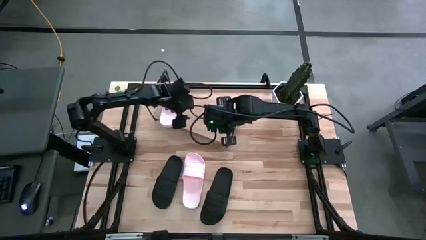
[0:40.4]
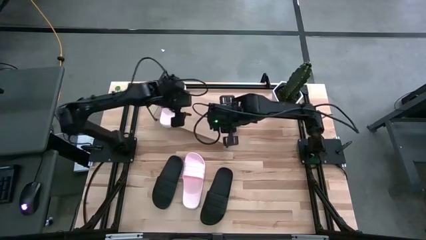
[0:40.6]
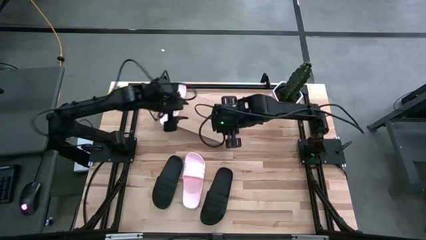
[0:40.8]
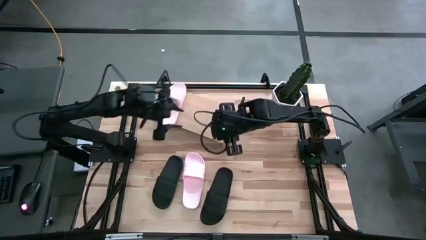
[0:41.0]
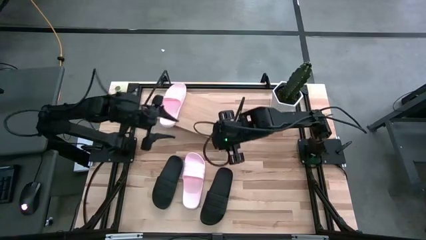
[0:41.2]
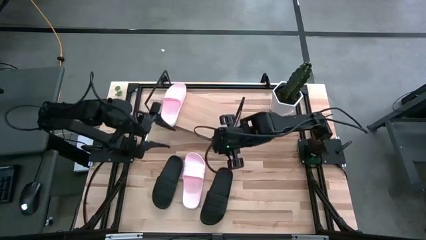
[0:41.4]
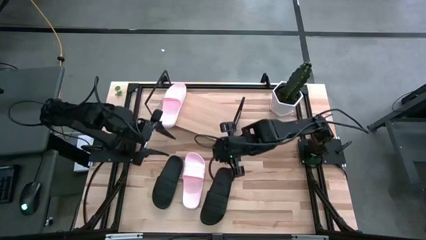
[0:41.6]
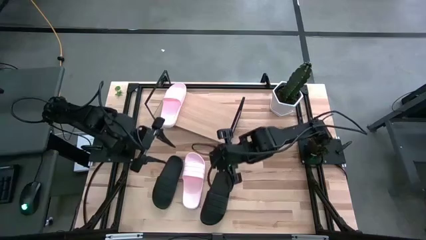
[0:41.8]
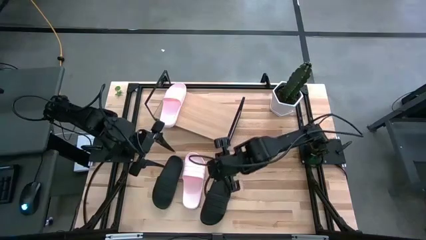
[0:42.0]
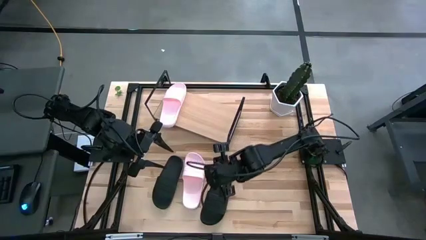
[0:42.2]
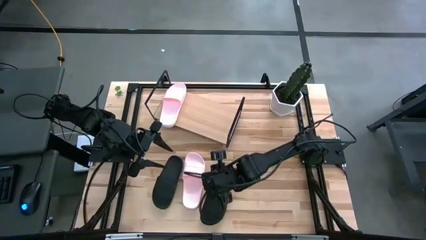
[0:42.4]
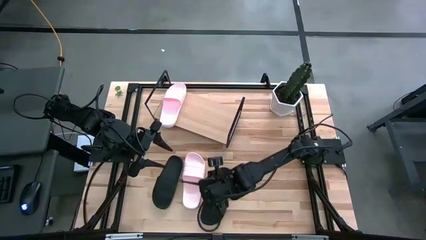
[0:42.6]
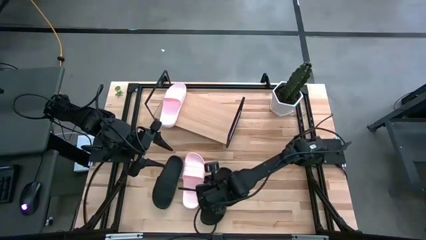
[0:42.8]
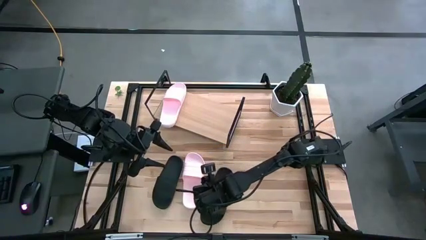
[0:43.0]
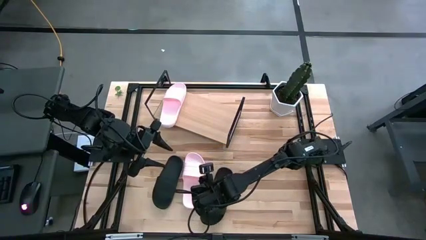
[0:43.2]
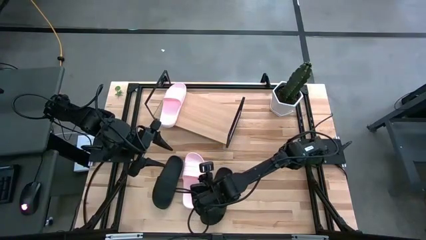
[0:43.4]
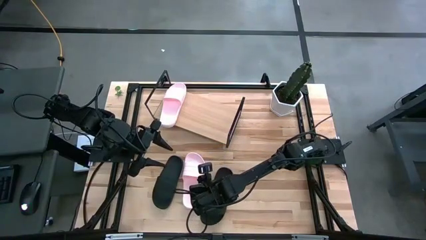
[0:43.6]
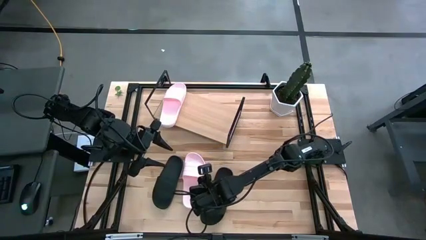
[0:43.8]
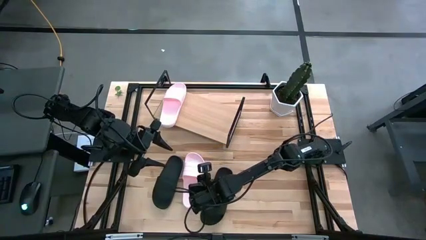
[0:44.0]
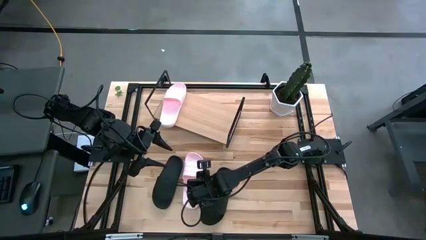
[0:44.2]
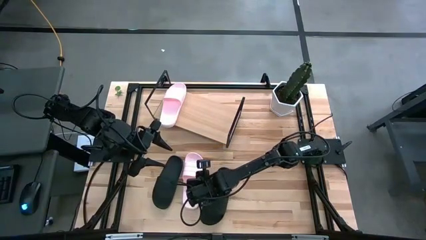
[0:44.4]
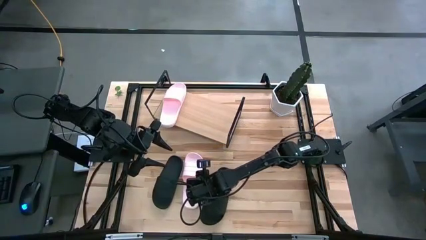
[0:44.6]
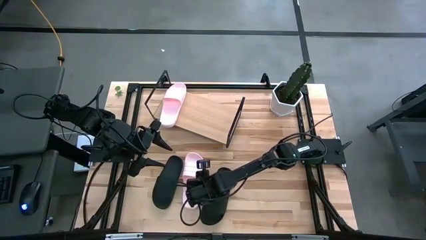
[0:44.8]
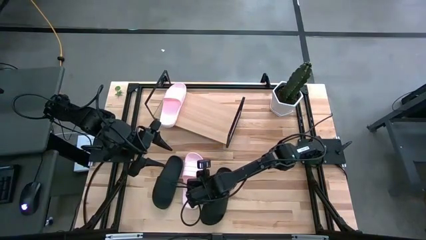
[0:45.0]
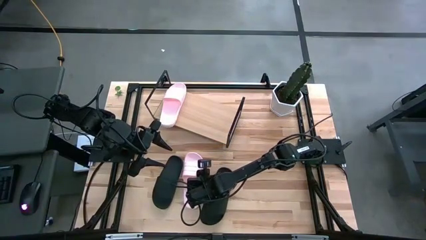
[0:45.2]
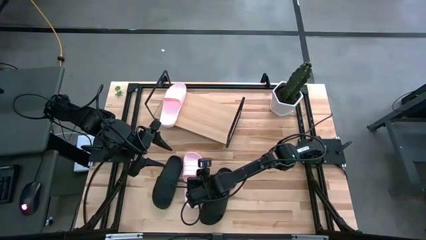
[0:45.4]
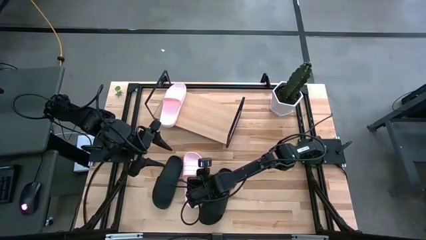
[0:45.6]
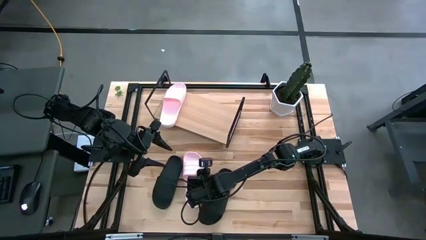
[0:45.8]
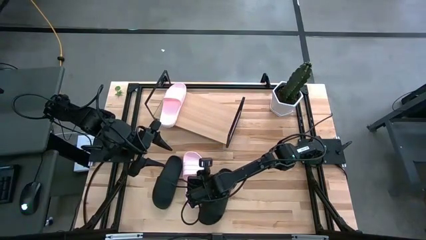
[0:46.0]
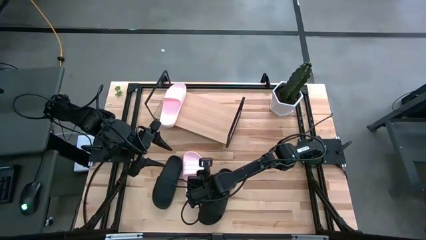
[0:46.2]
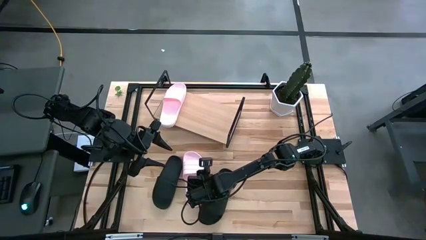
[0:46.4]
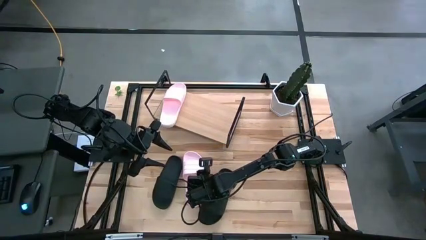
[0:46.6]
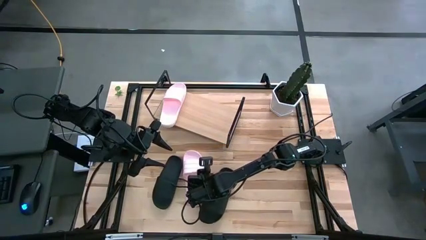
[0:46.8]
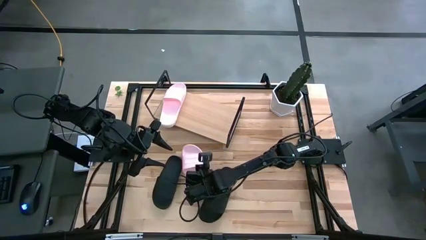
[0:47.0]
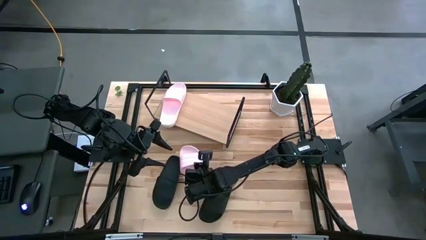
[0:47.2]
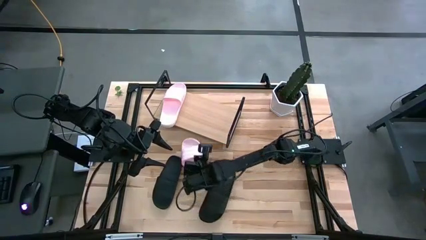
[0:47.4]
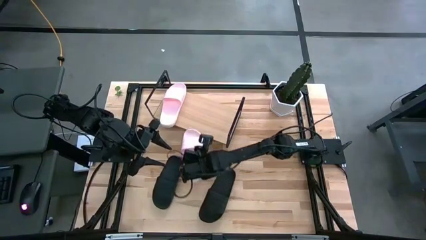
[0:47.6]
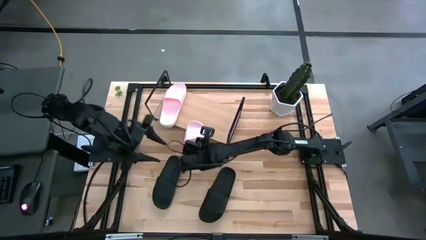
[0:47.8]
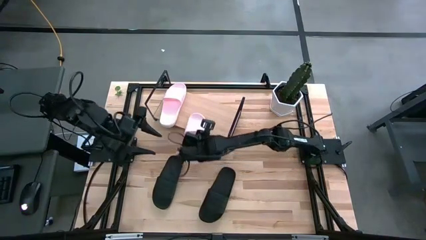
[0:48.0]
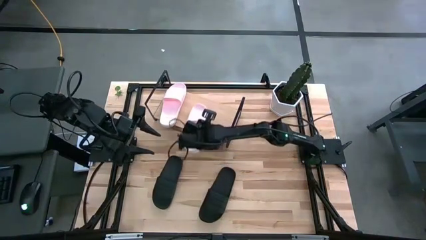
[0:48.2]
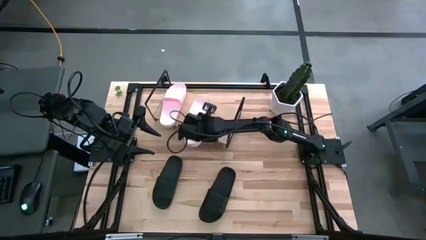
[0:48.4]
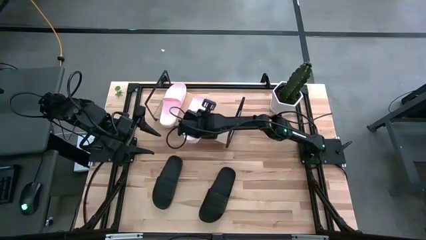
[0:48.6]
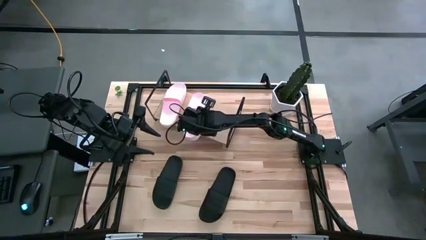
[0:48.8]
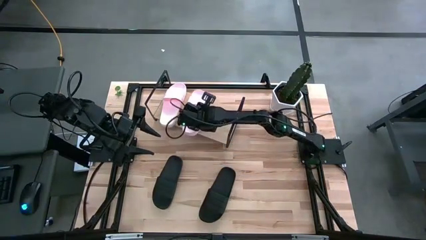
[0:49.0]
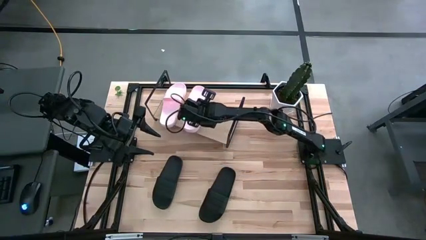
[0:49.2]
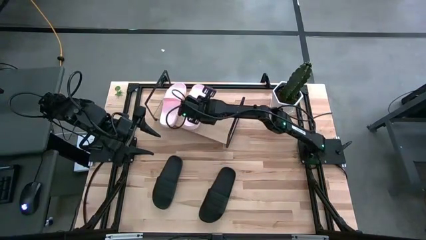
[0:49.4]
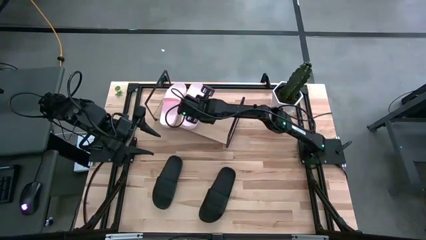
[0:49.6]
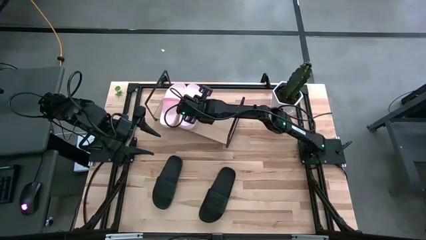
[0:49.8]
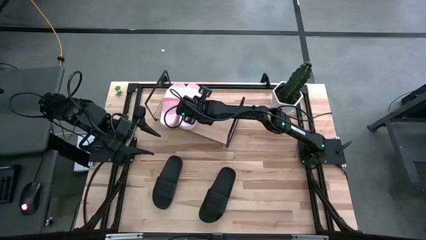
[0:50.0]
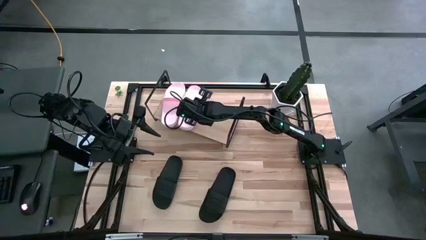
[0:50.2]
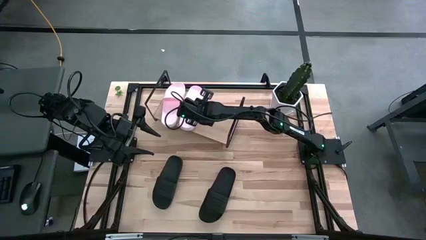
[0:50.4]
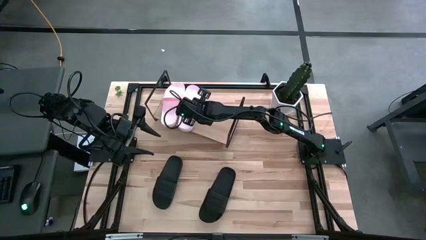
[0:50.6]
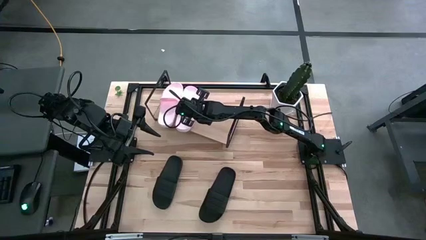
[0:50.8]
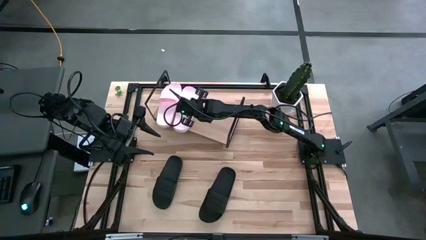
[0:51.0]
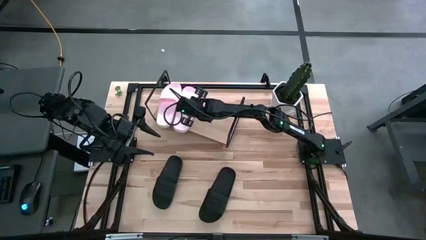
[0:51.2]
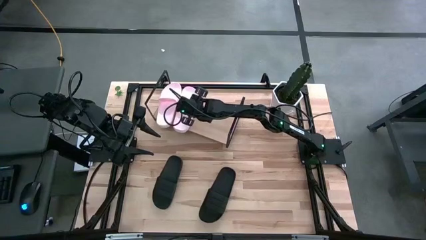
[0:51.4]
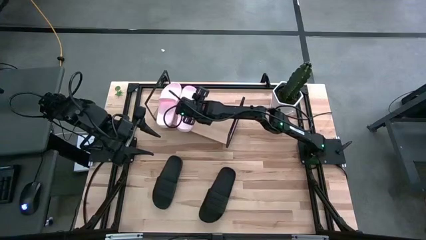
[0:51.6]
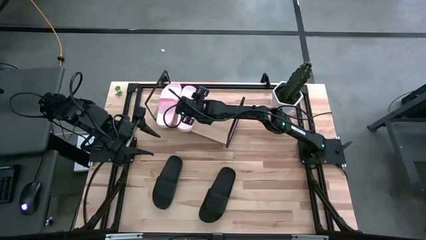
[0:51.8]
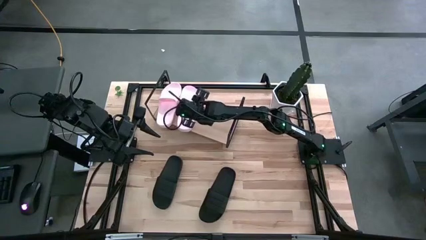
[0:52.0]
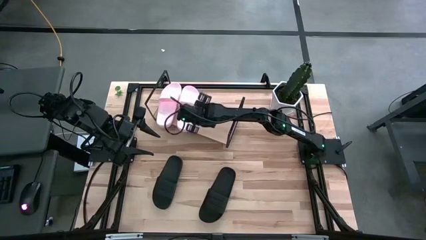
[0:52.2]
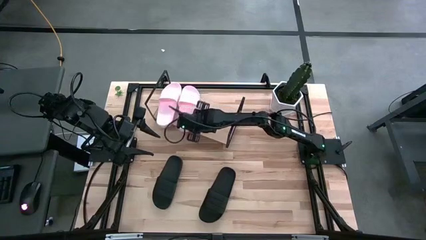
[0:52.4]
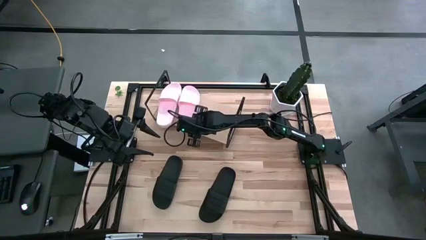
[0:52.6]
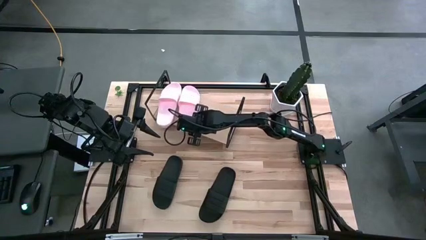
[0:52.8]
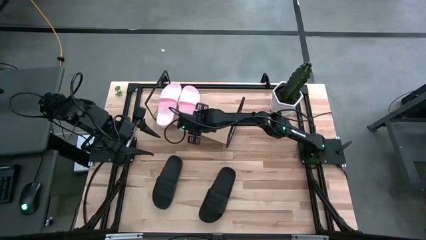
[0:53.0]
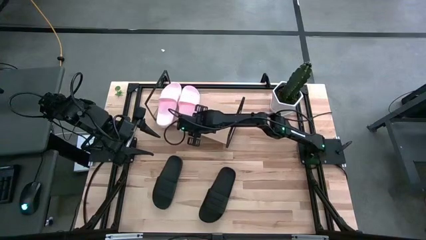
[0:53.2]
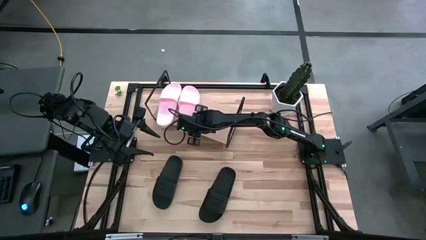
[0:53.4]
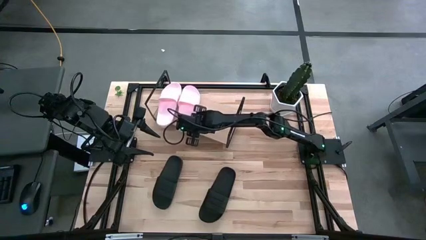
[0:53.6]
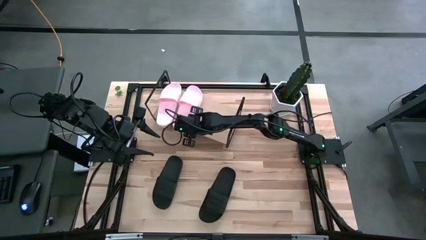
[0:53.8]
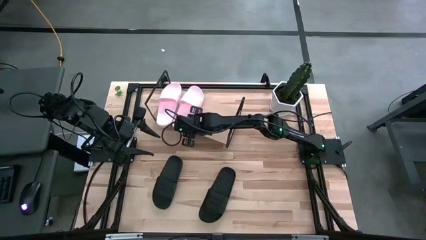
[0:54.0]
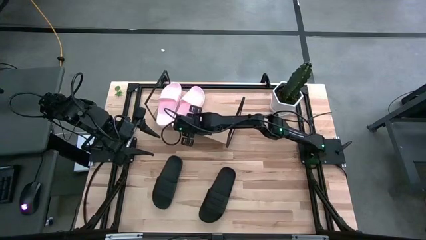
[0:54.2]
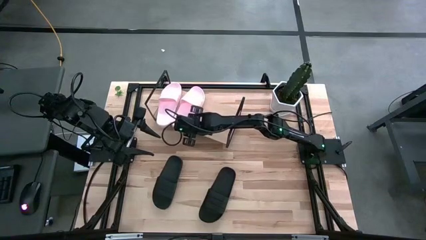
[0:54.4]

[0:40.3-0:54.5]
Task: Pick and place slides into the shelf
Put the pink slide on the shelf

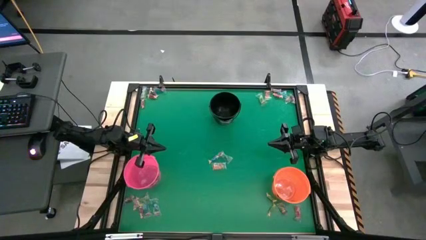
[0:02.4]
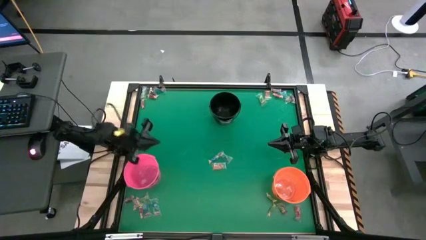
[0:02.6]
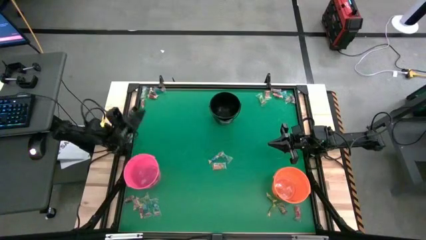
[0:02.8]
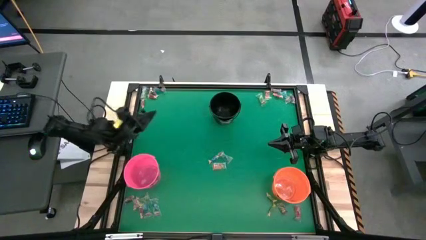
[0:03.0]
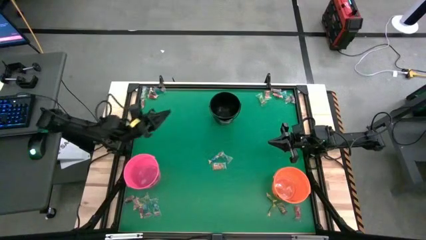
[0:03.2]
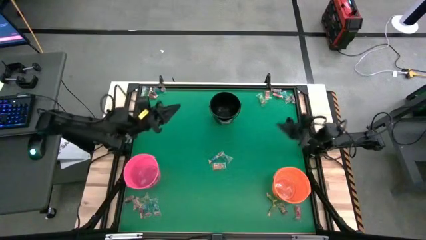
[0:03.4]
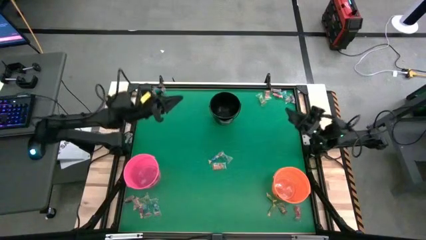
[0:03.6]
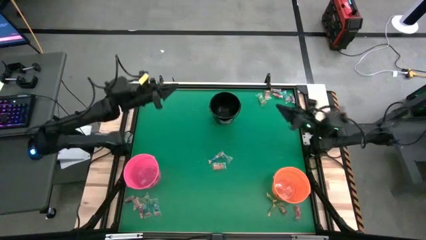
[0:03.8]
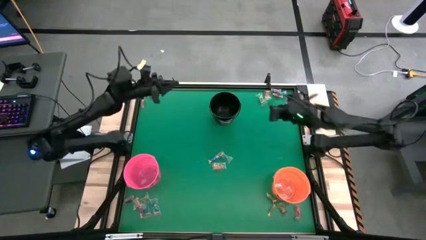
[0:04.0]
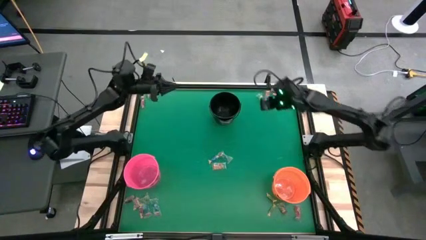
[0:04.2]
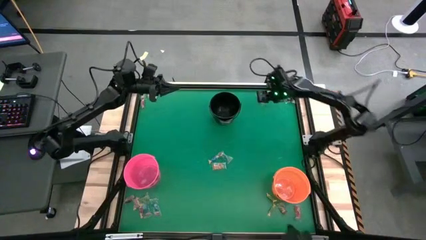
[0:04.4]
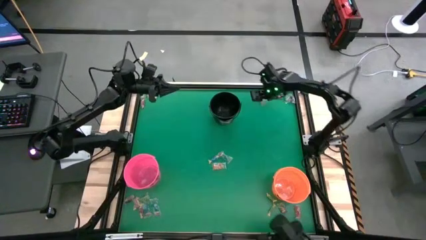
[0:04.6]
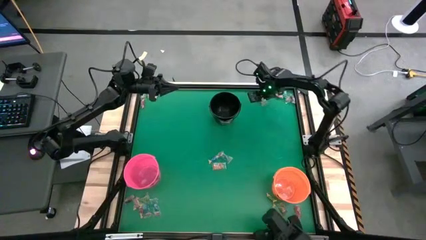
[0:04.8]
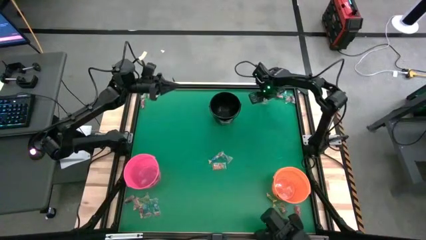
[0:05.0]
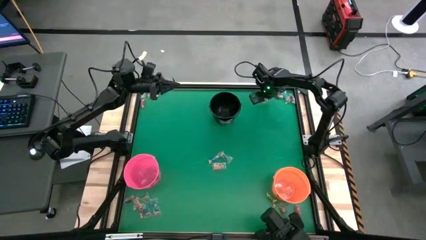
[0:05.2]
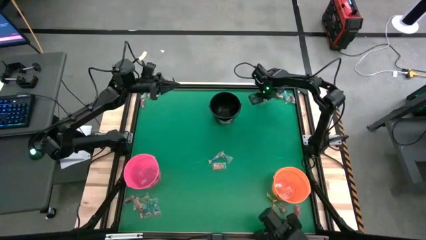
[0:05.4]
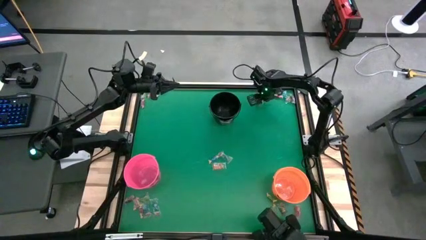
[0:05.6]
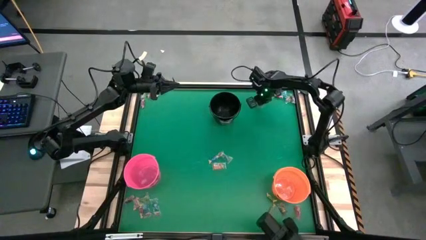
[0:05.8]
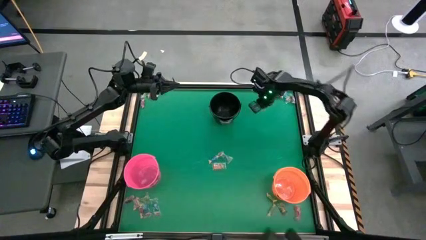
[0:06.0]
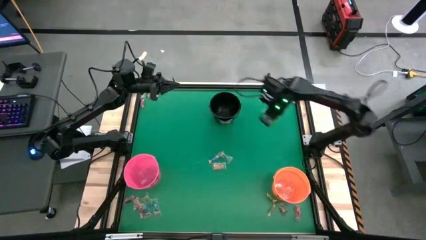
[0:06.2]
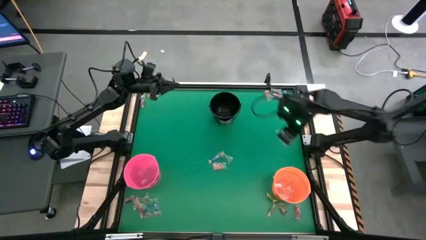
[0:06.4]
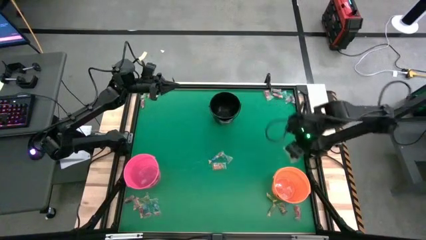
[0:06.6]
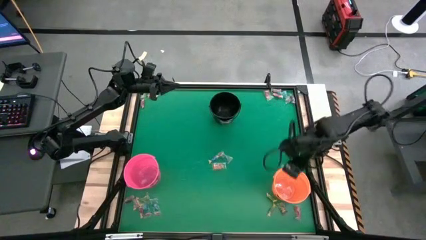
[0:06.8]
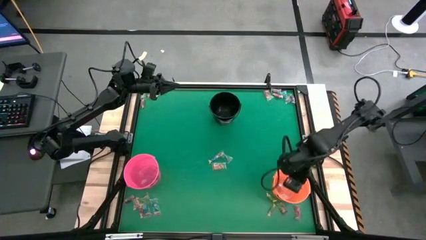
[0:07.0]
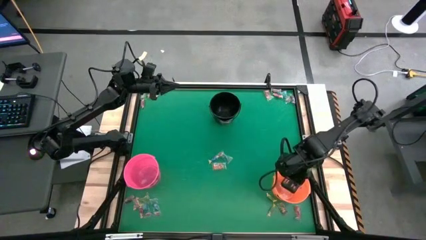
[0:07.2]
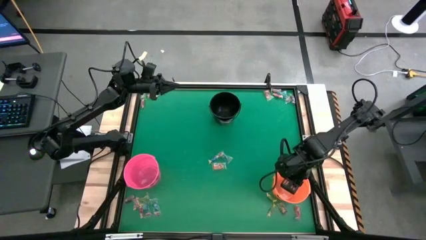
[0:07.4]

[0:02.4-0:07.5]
Task: Sort candy by brand, put in halloween buckets
Put the green gummy into the orange bucket
